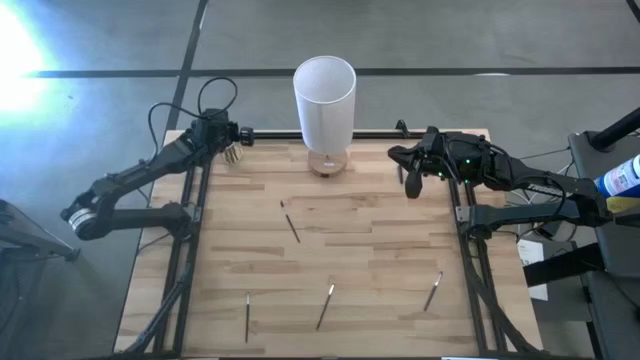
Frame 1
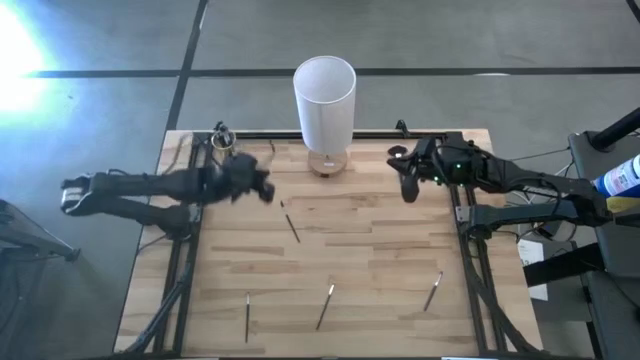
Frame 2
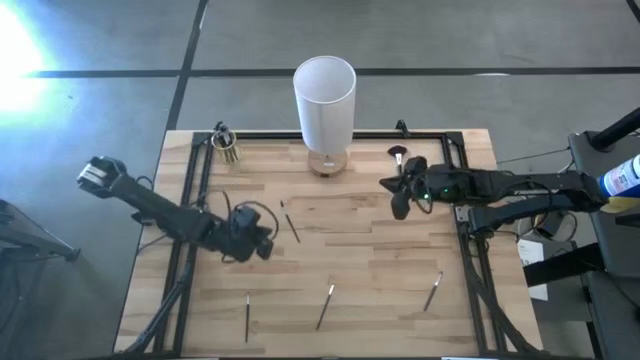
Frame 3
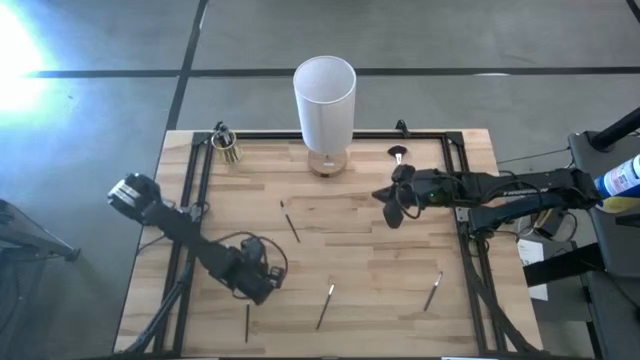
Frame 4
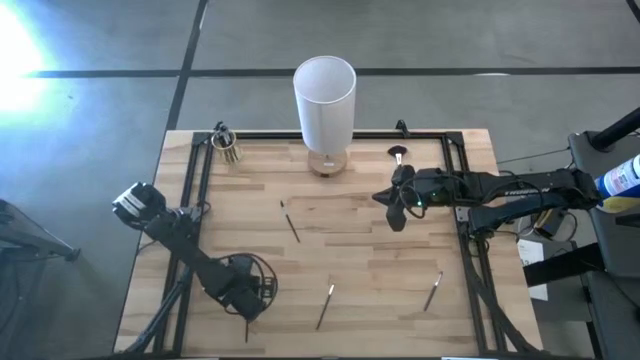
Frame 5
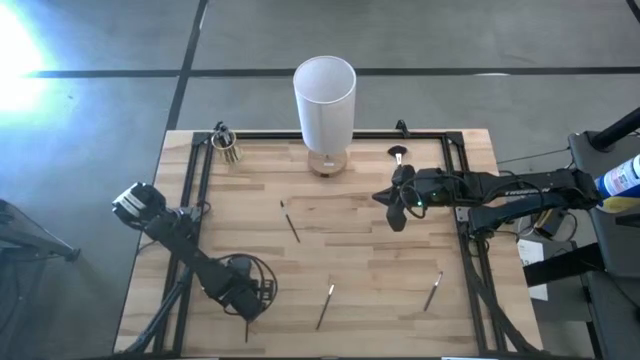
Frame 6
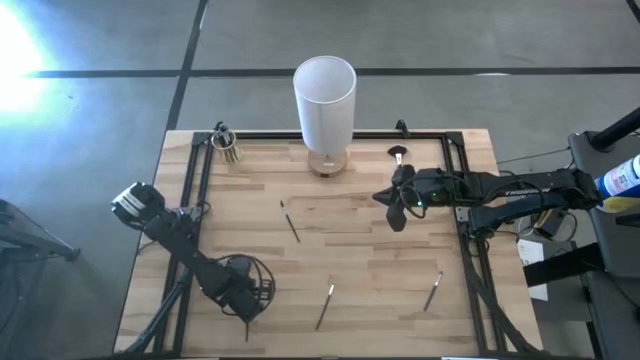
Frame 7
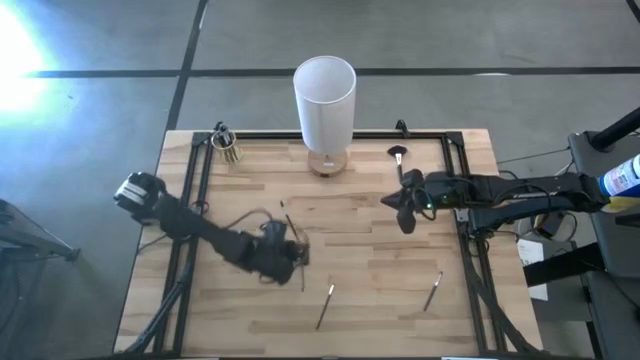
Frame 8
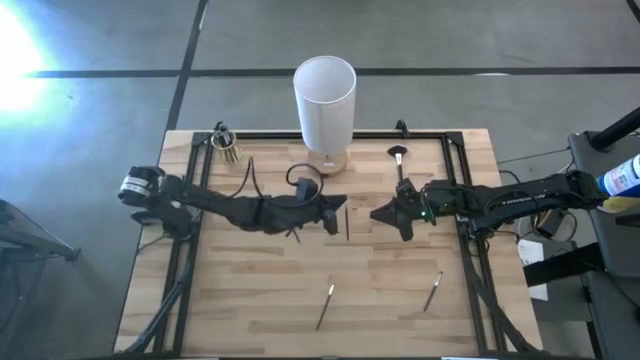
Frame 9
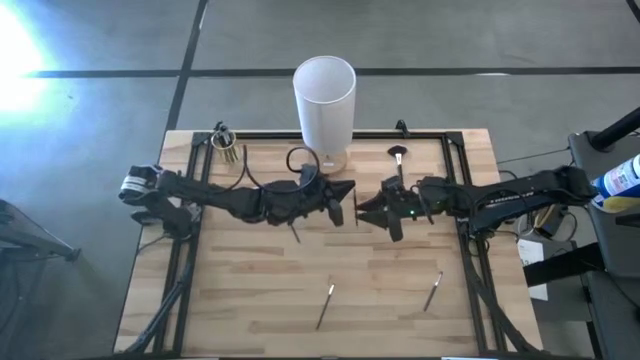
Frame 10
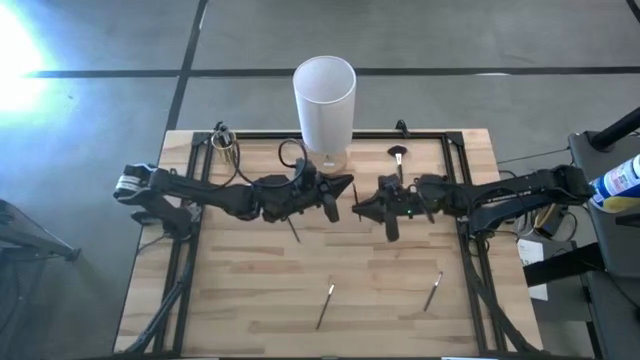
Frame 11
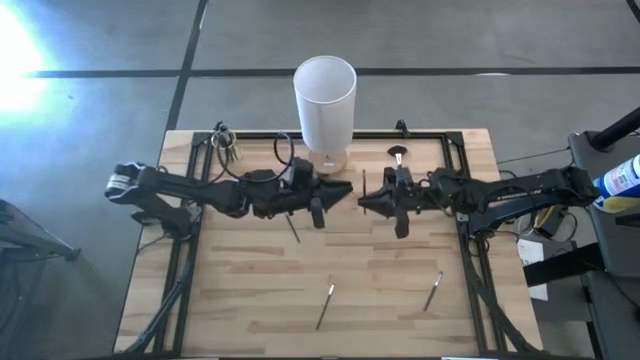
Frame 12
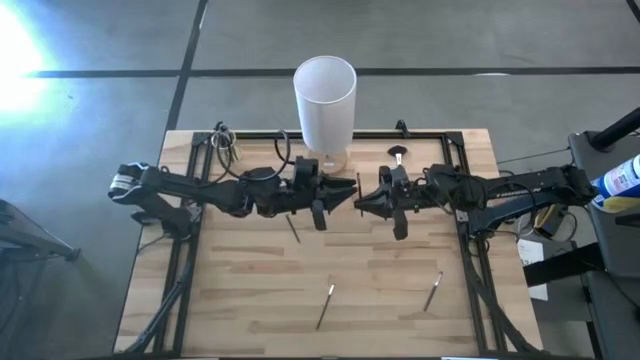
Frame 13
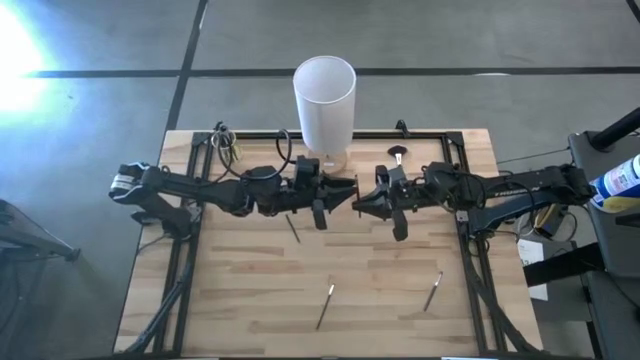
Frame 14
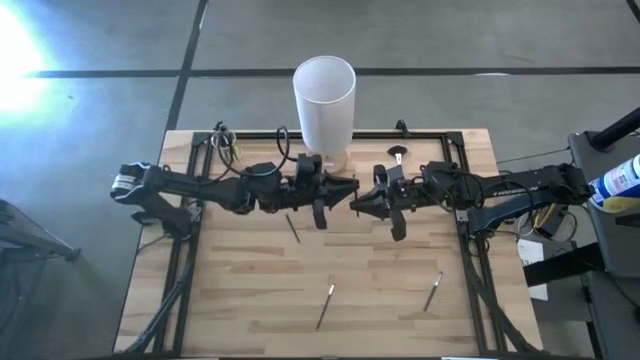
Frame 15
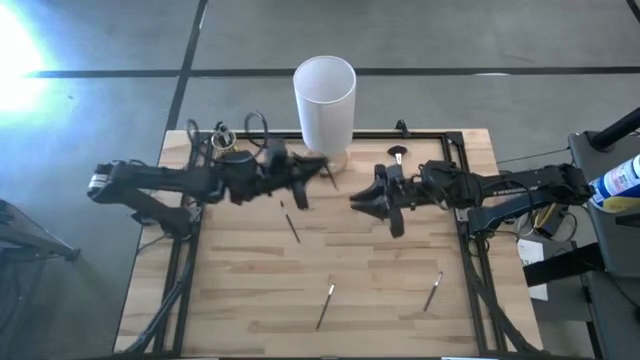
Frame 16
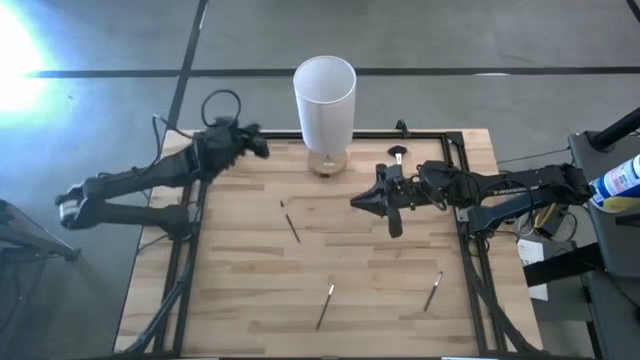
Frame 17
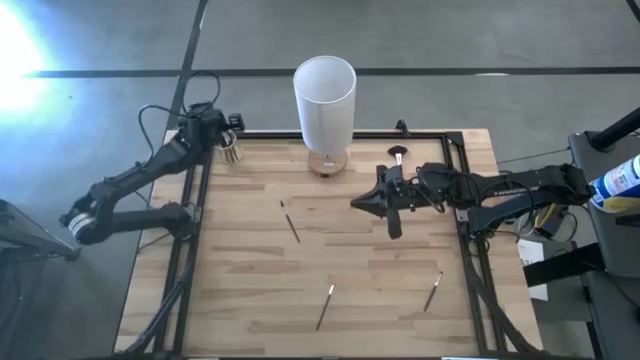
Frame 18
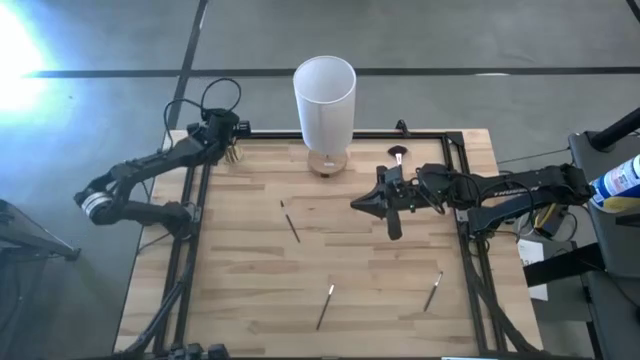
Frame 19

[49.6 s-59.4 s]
Task: Pick & Place Makeup Brushes
Put the eyeshadow brush into the makeup holder

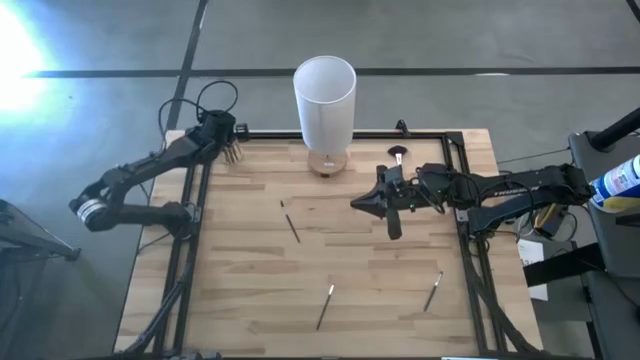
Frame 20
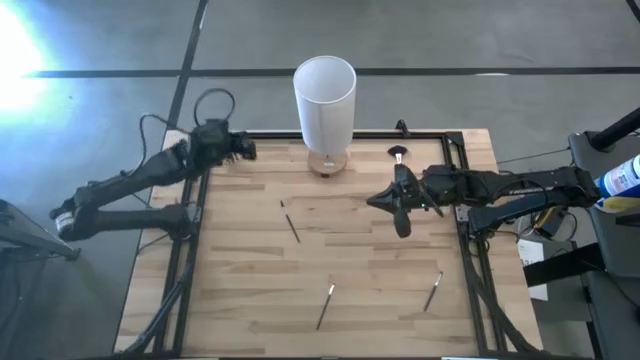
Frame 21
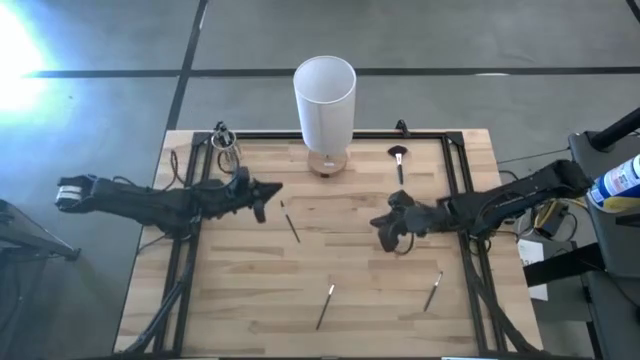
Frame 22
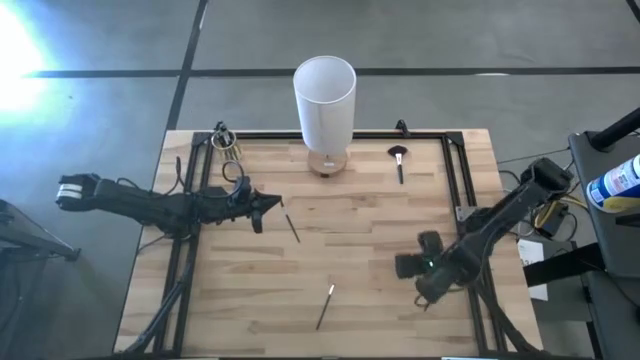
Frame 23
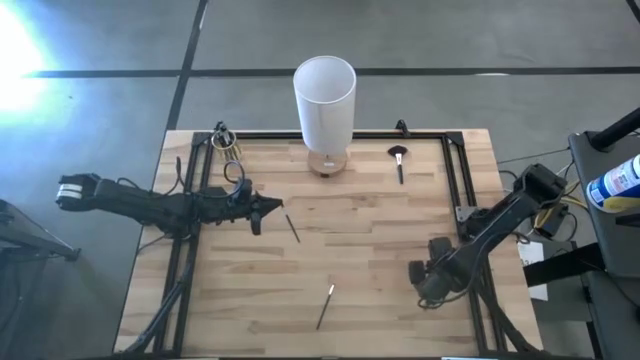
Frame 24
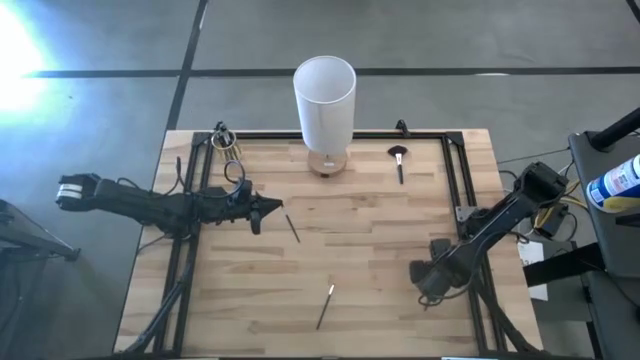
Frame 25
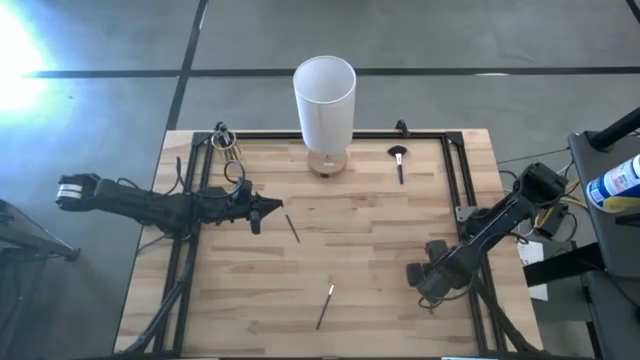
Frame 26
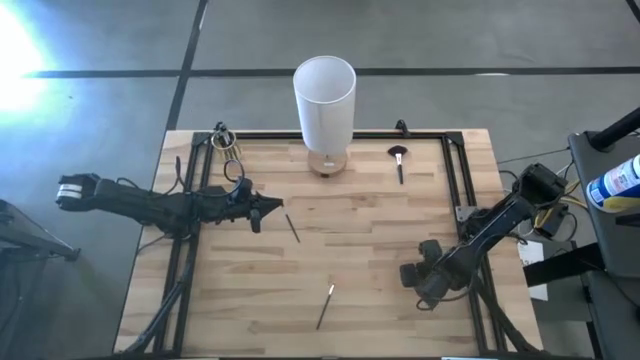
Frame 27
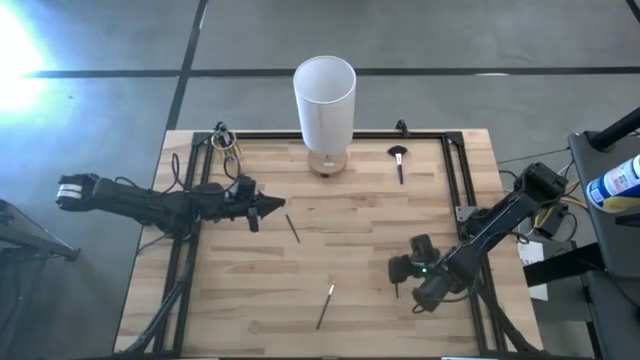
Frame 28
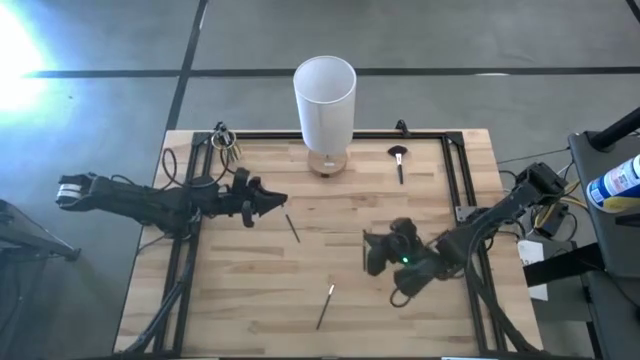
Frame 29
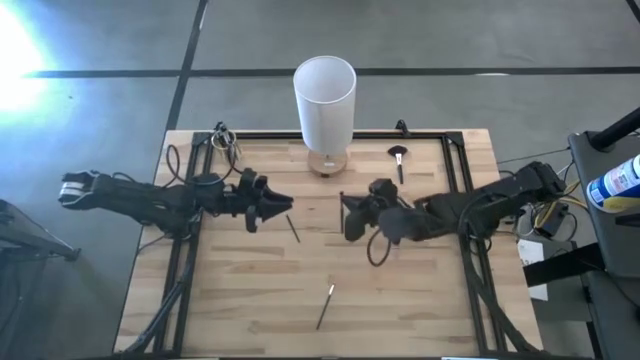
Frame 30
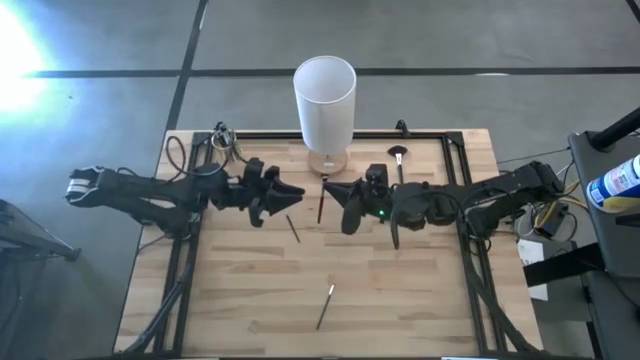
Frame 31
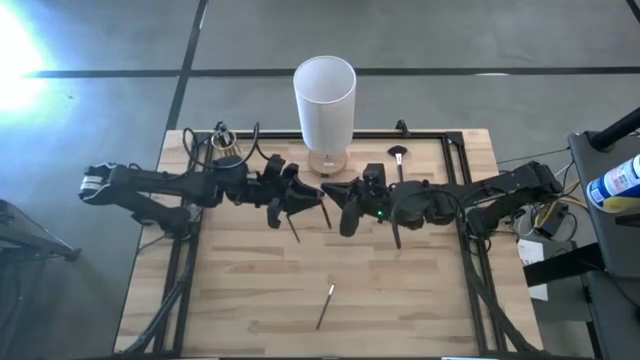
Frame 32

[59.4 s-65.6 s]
Put the eyeshadow brush into the makeup holder

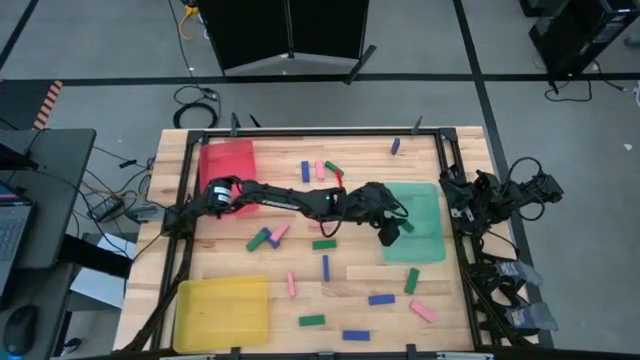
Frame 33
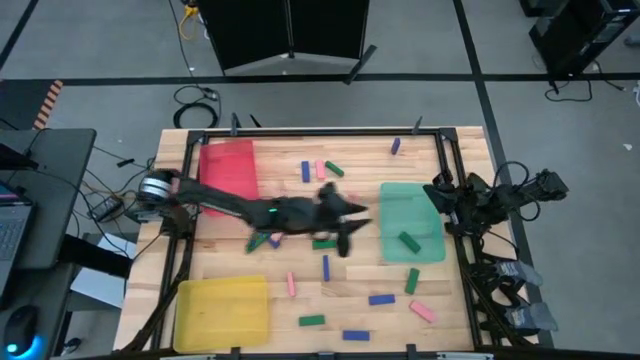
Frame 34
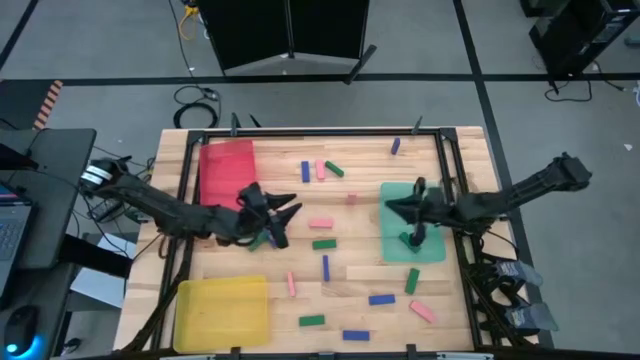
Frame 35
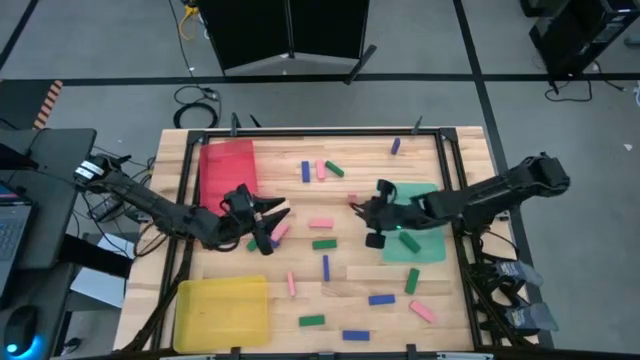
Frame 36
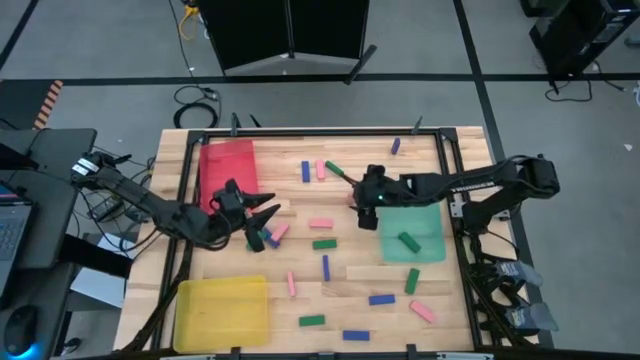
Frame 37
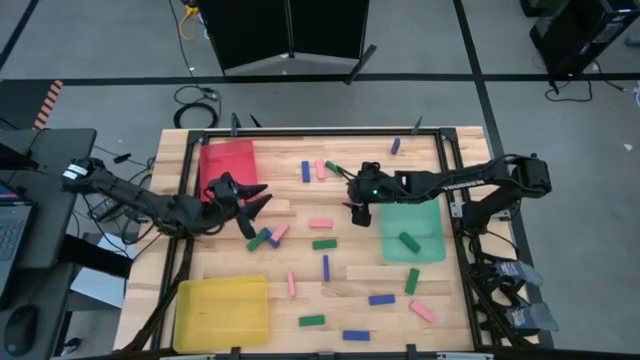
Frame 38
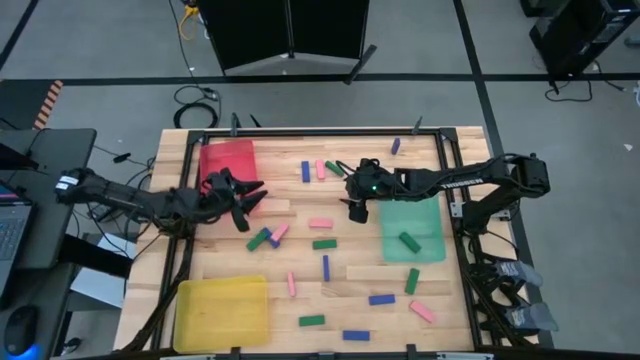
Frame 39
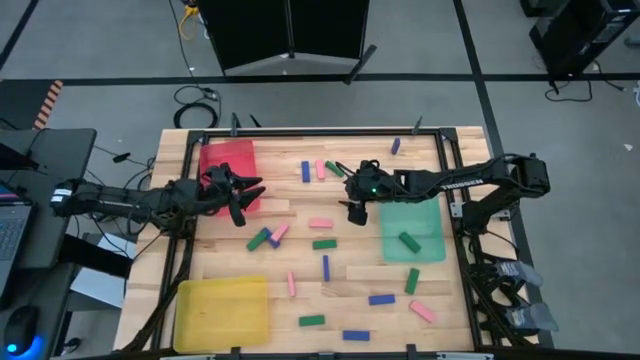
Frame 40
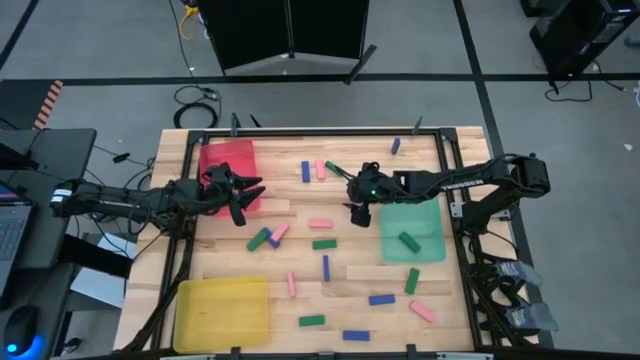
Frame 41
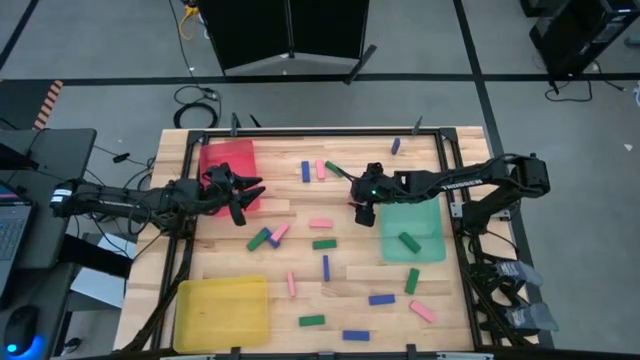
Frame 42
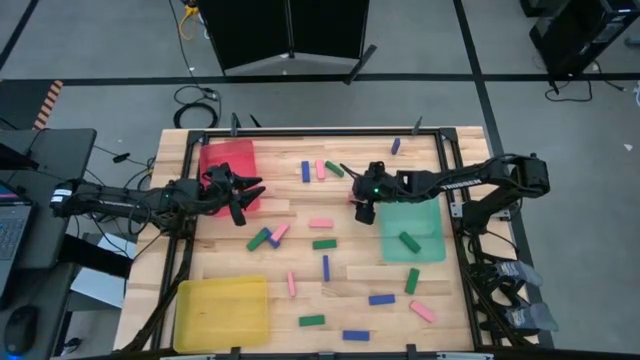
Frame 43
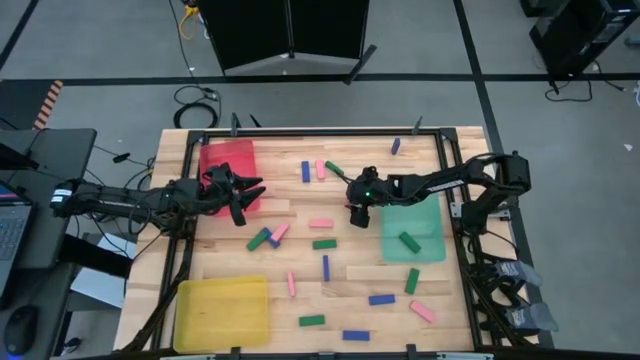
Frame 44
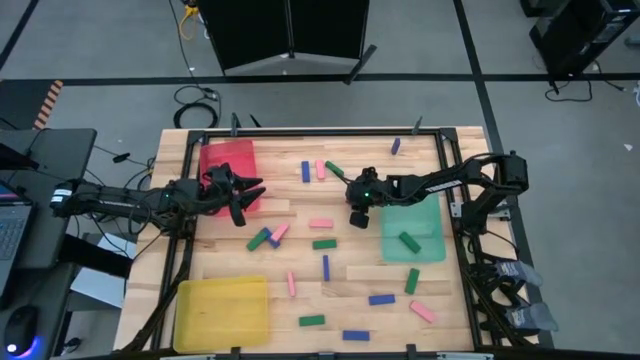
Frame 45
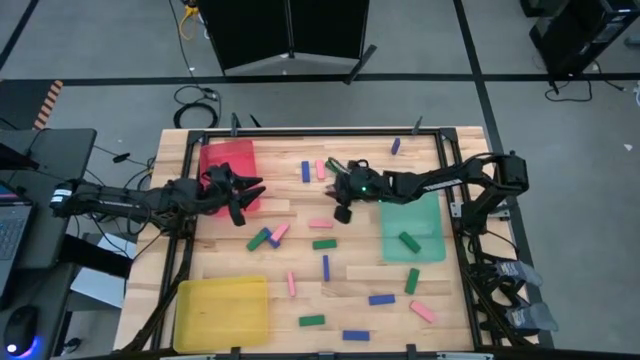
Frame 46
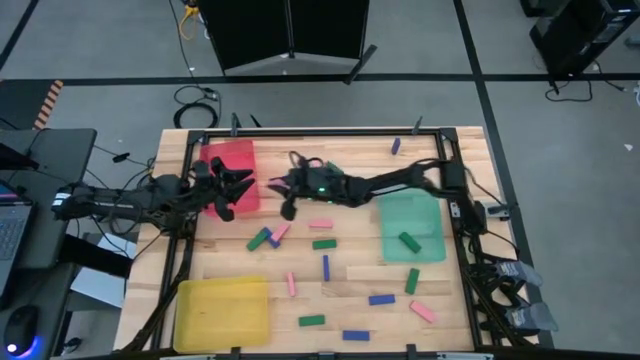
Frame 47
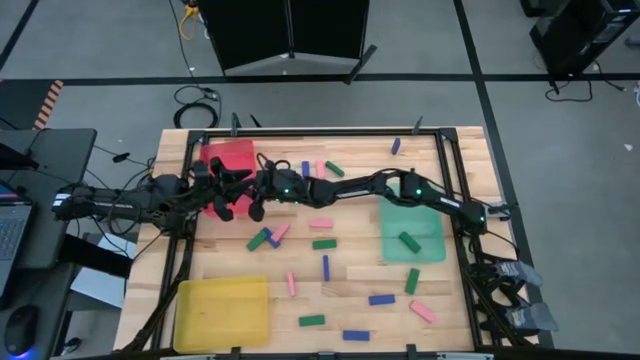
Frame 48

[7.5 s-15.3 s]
Task: Sort blocks
Put the pink block into the red bin
